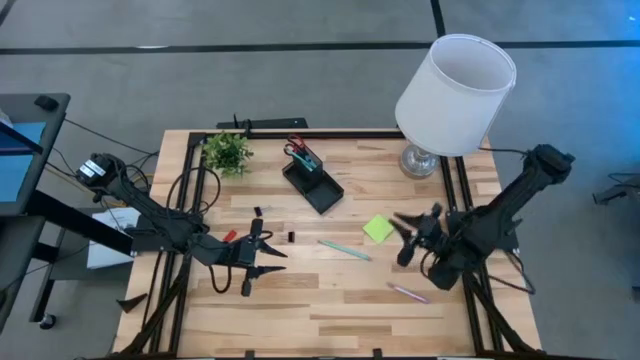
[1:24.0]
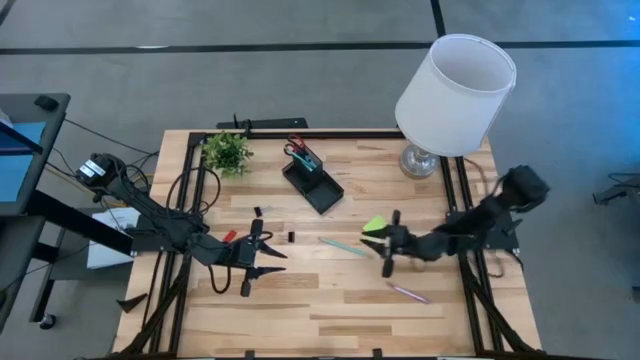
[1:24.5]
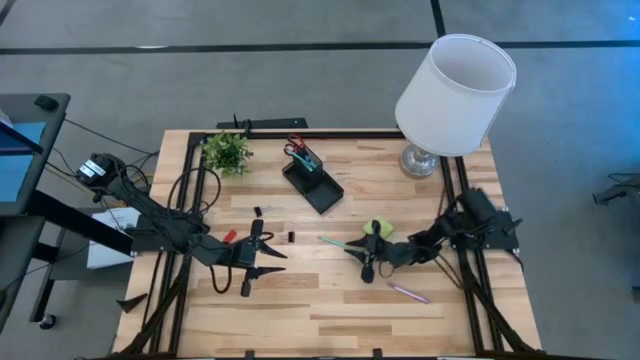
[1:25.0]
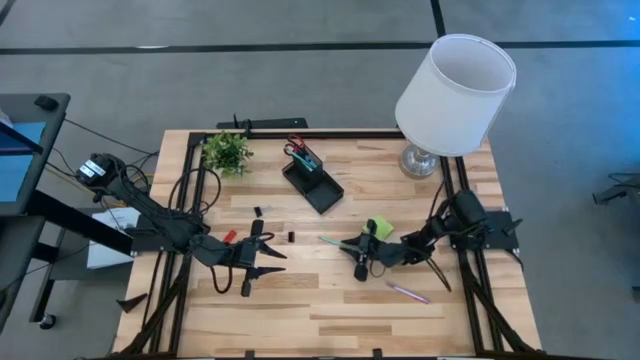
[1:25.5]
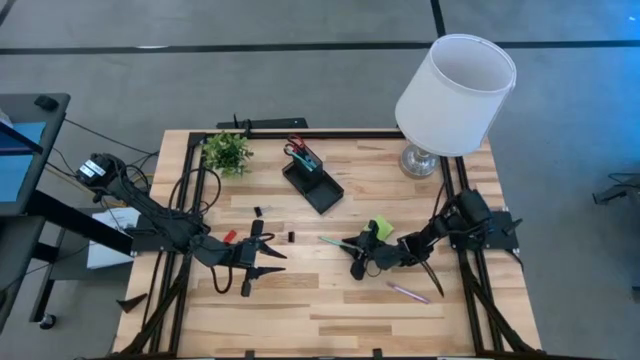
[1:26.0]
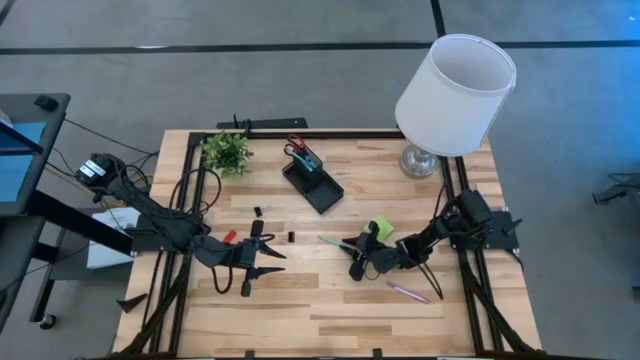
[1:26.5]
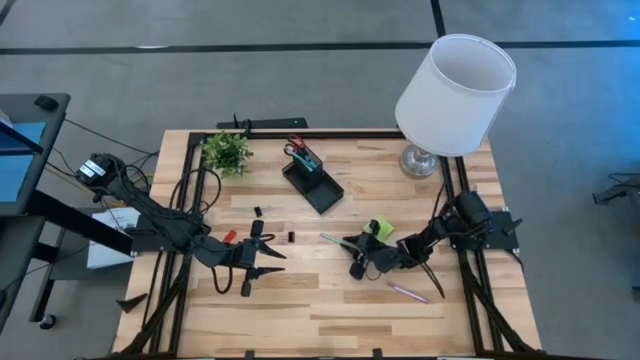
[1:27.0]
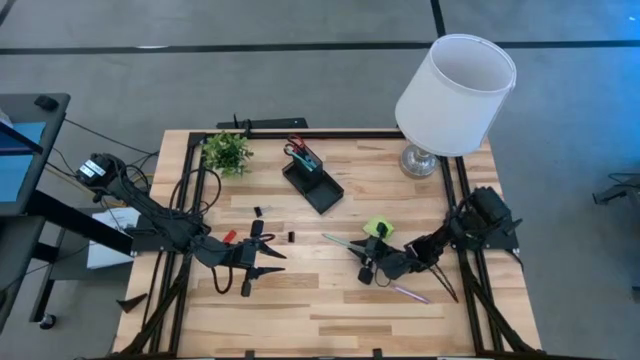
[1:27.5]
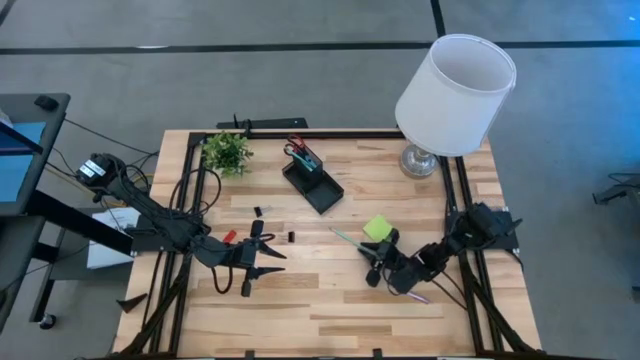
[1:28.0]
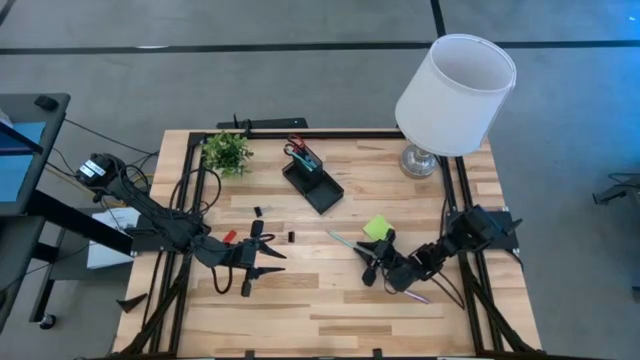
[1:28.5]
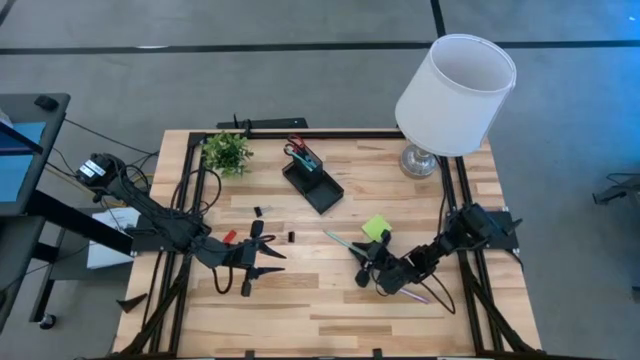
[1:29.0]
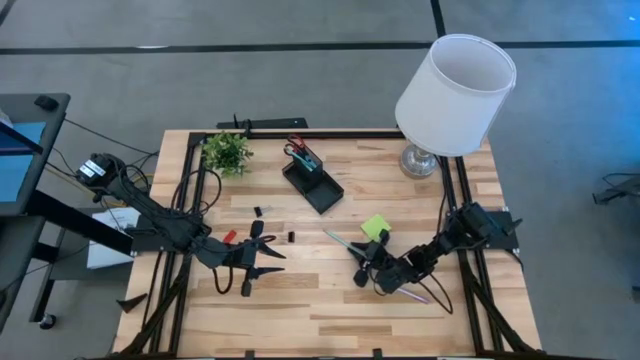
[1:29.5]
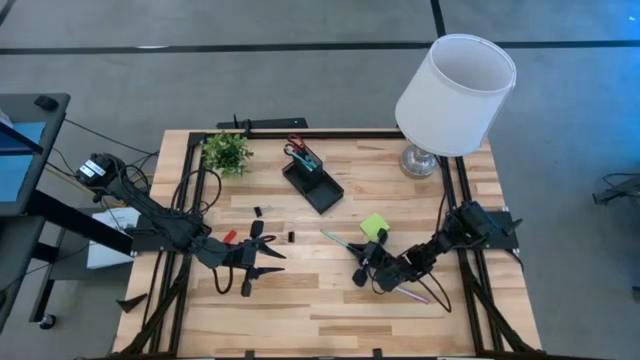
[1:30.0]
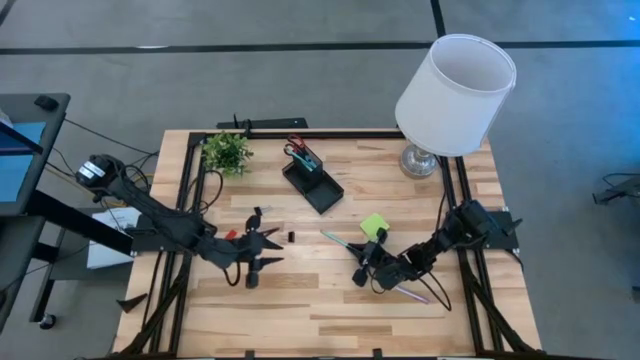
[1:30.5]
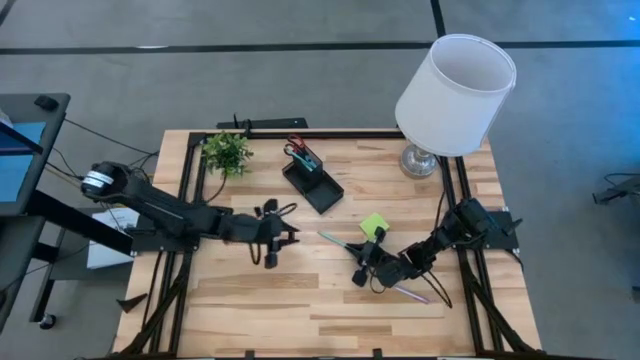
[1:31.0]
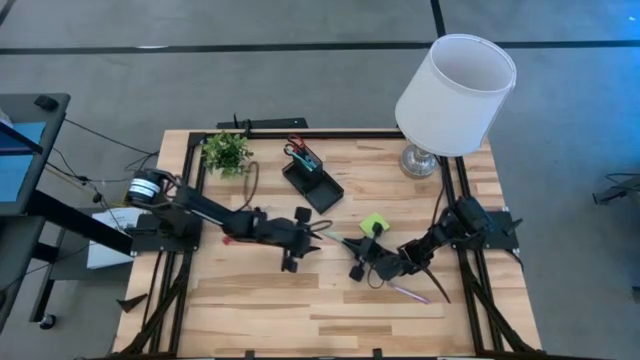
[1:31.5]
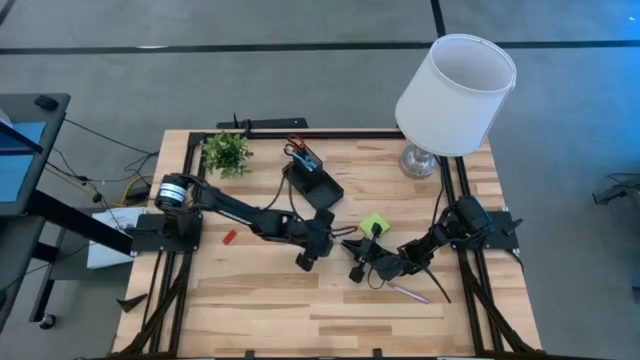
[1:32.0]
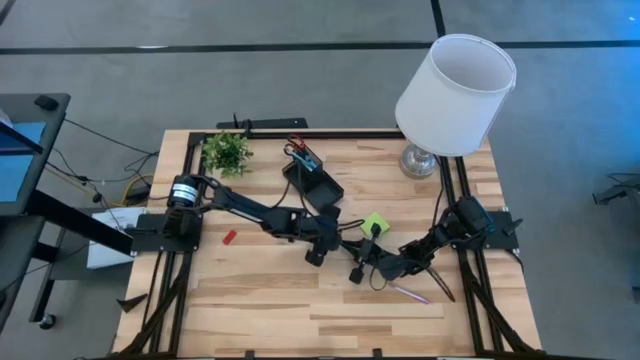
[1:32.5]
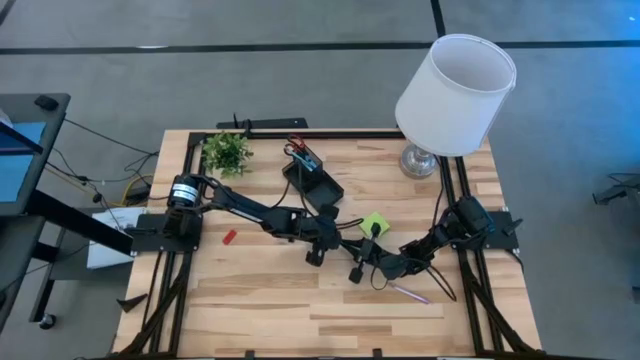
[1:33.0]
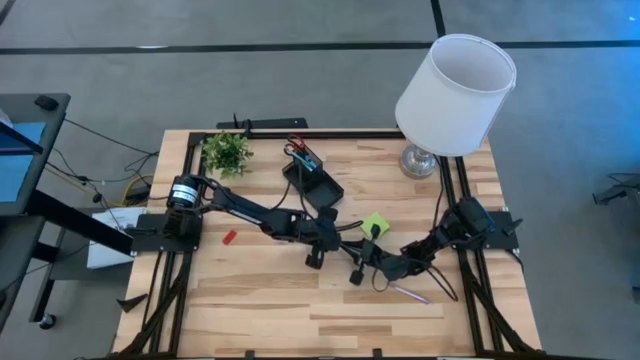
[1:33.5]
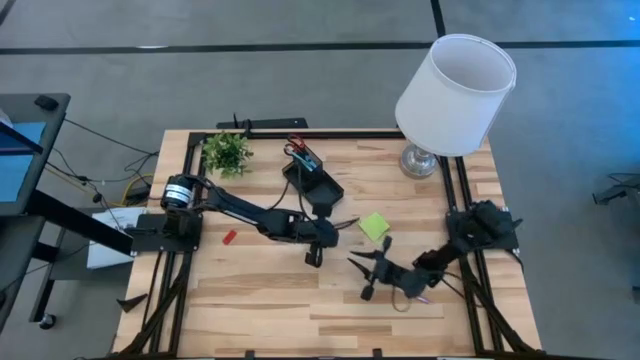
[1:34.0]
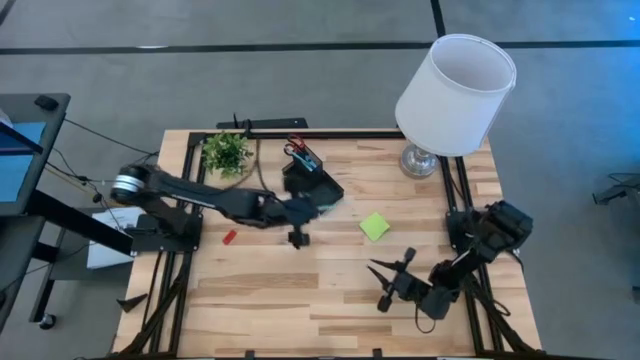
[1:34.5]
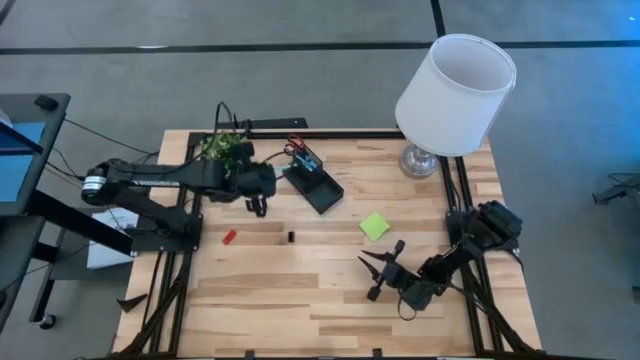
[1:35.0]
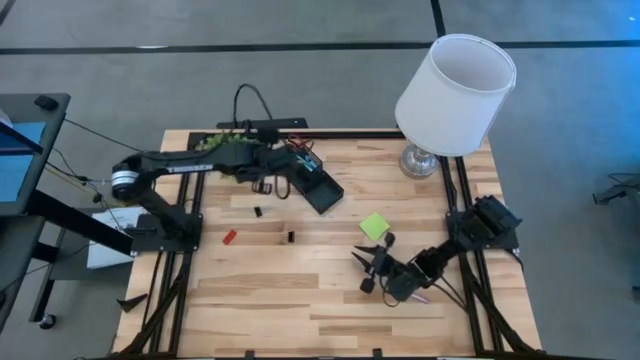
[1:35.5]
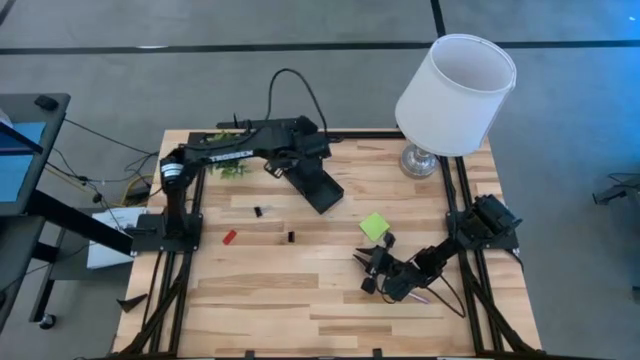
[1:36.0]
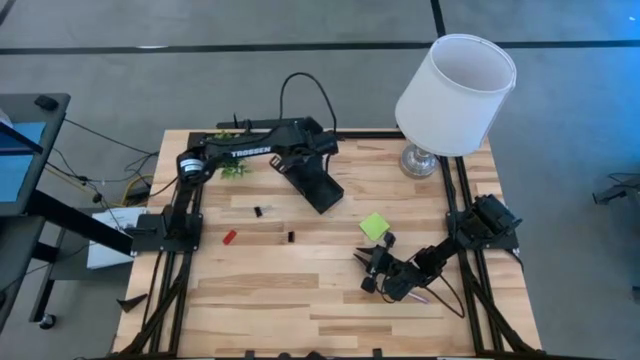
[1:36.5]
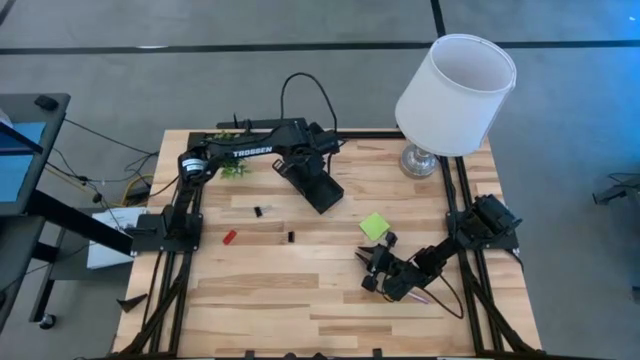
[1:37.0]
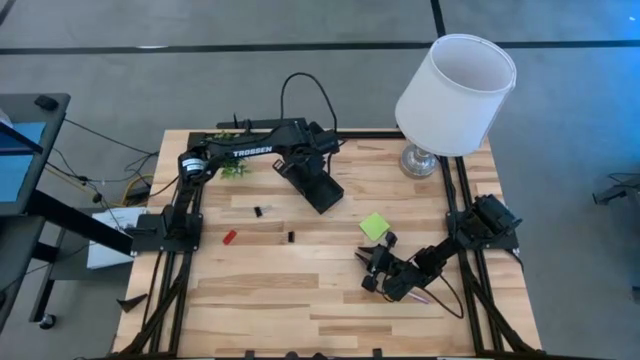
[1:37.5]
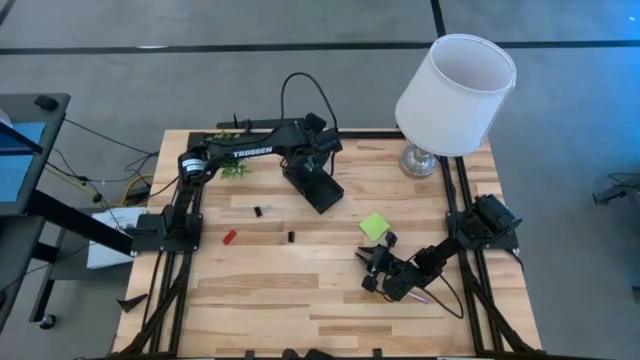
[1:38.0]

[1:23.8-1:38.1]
Task: Pick and place office supplies into organizer
Put the blue pencil into the desk organizer

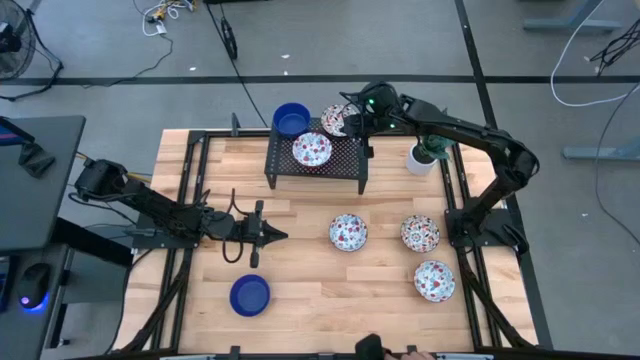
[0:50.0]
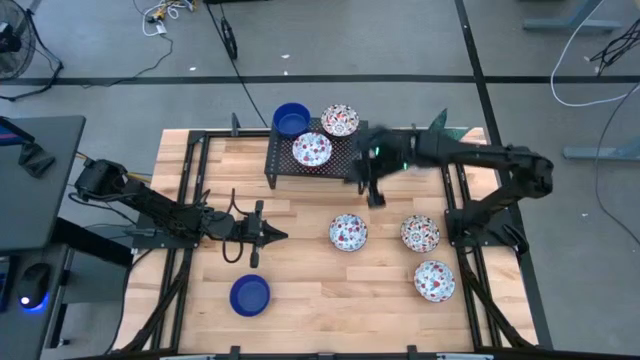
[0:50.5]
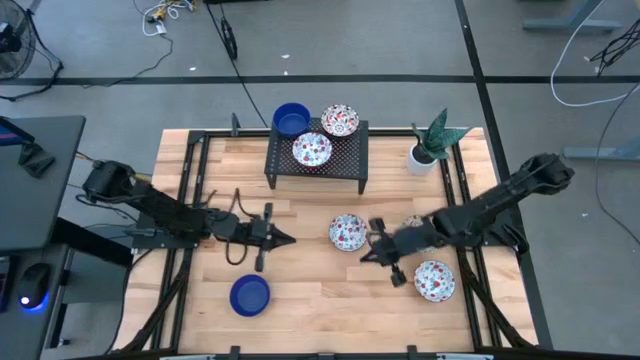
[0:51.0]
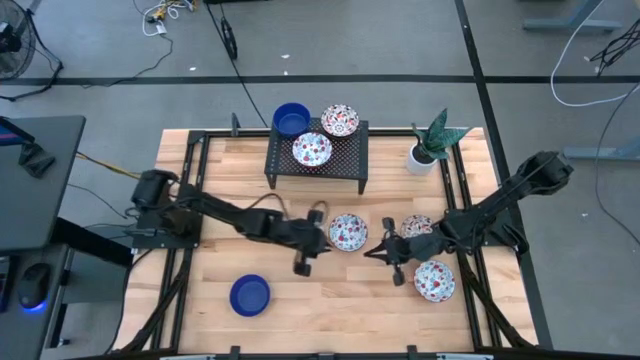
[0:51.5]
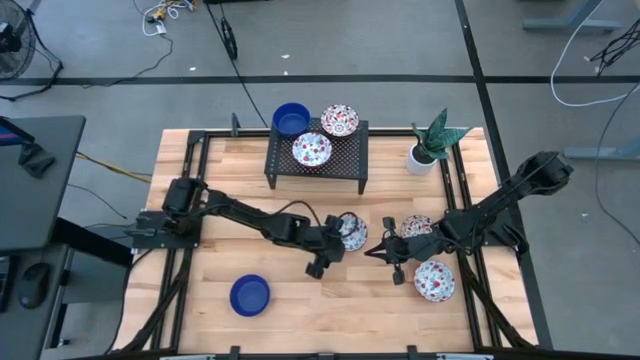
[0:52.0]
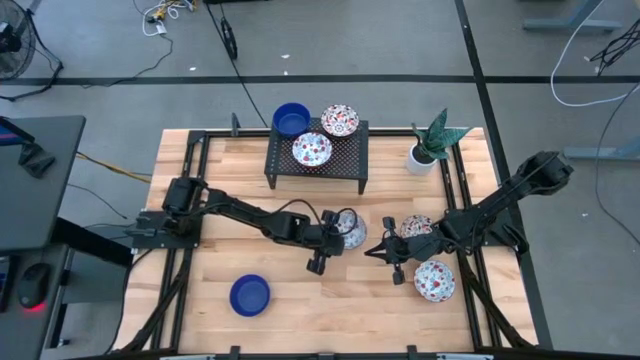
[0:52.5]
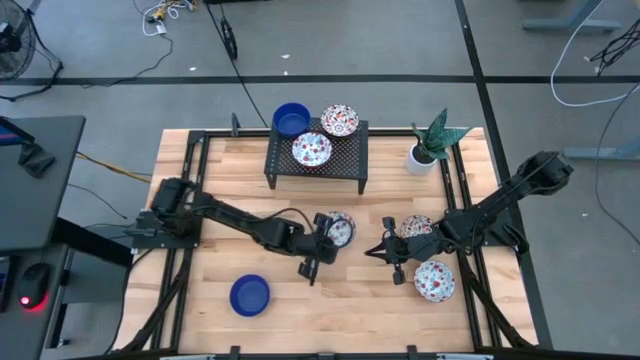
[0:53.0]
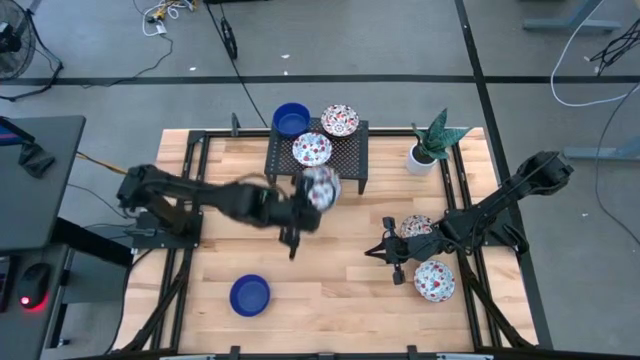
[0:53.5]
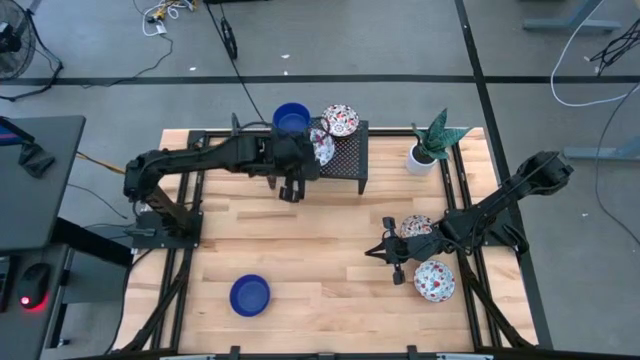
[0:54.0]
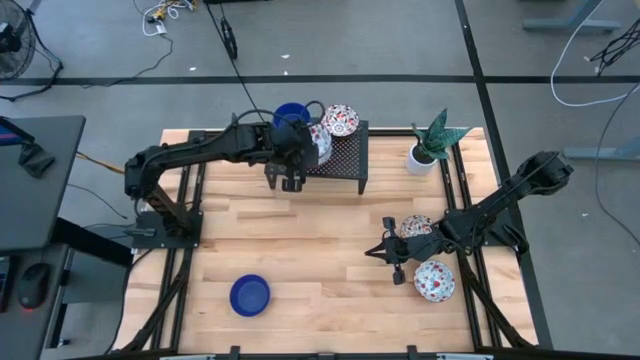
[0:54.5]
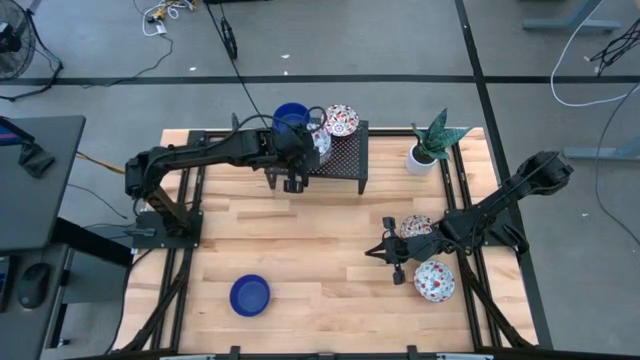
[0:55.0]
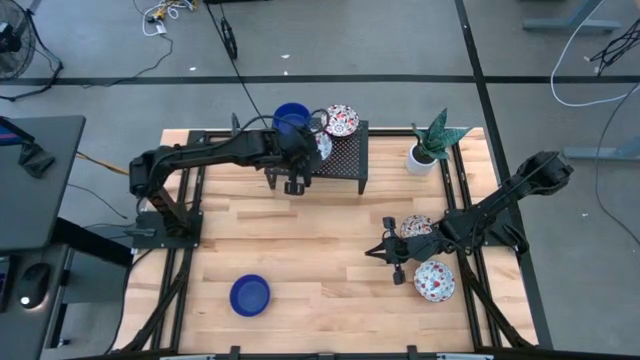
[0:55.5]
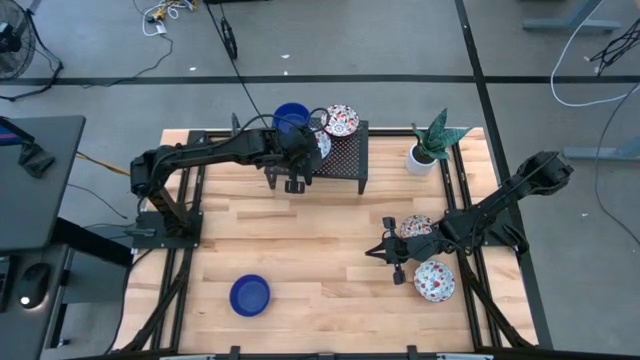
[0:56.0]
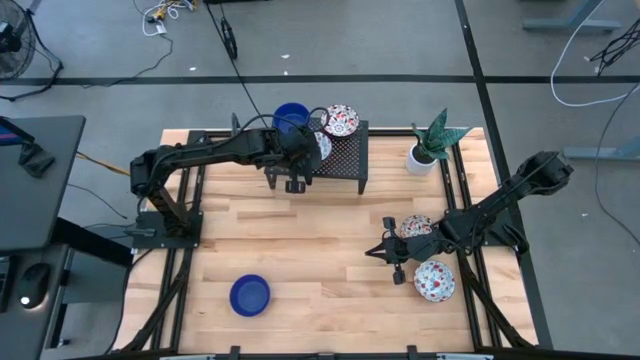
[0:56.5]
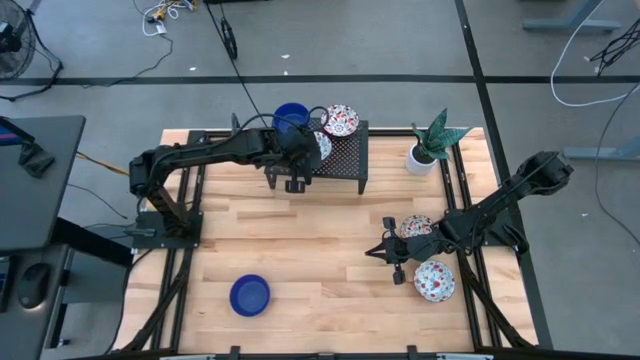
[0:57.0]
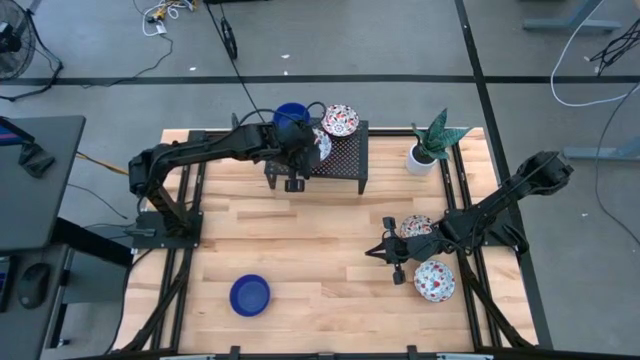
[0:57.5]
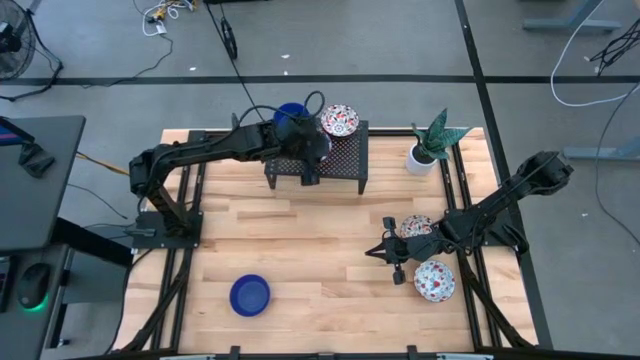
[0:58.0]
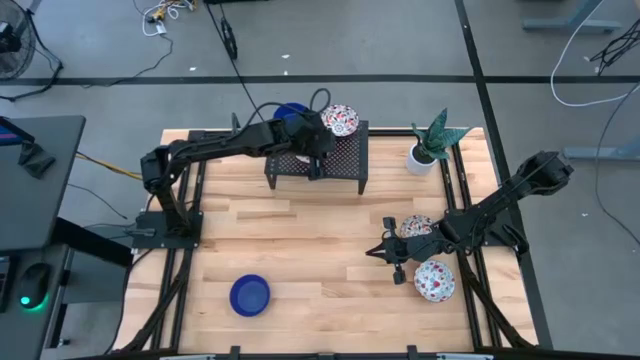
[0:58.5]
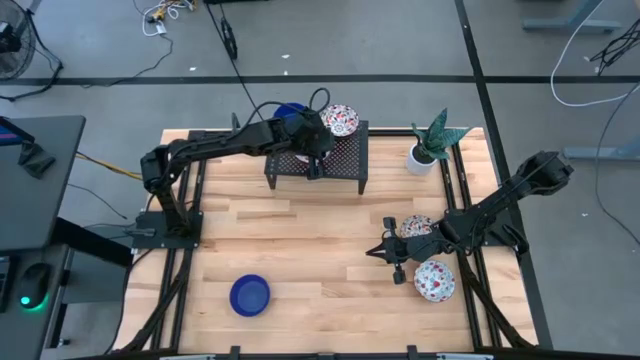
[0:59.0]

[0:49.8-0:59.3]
Task: Pick & Place Mini bowls
Stack the top red bowl on top of the other red bowl on the shelf
